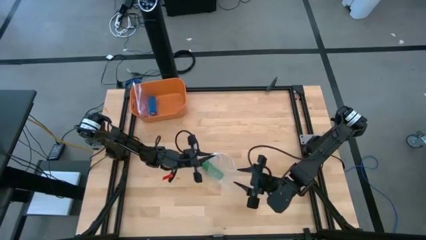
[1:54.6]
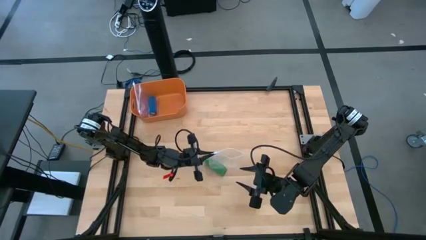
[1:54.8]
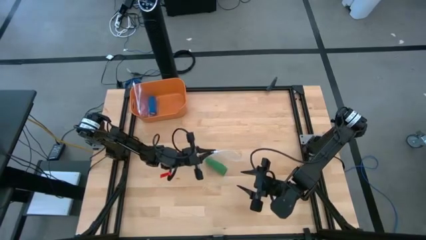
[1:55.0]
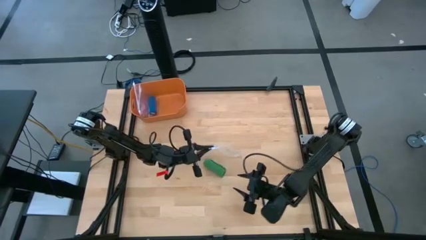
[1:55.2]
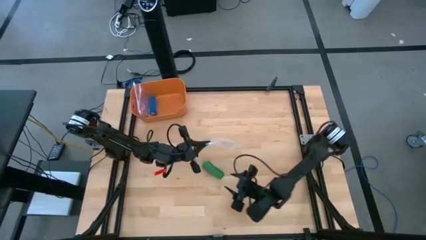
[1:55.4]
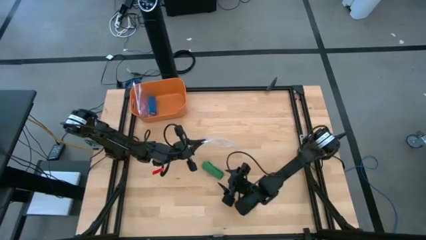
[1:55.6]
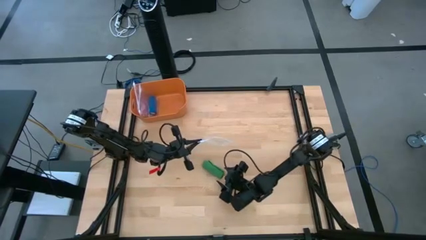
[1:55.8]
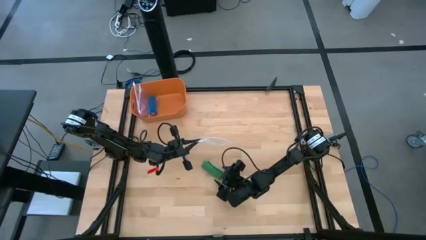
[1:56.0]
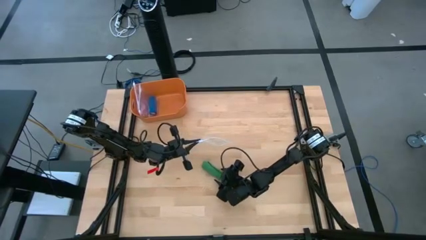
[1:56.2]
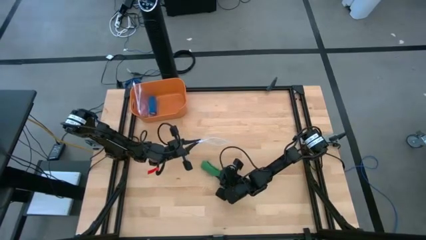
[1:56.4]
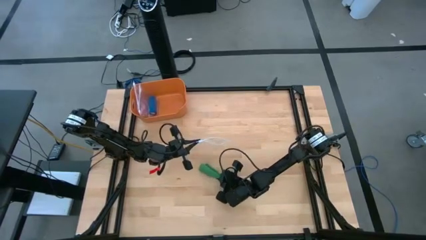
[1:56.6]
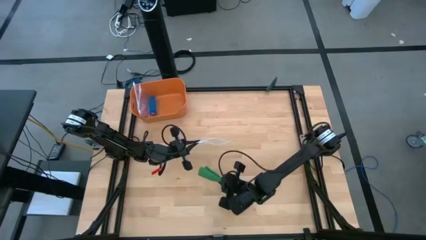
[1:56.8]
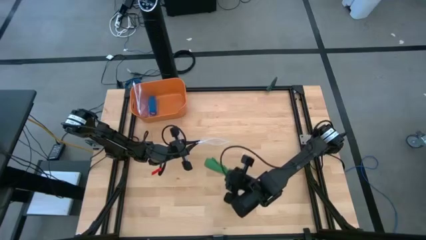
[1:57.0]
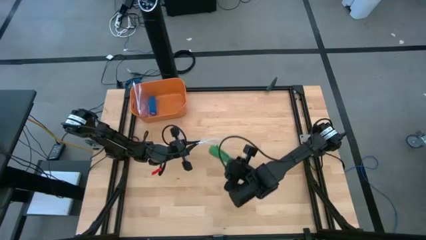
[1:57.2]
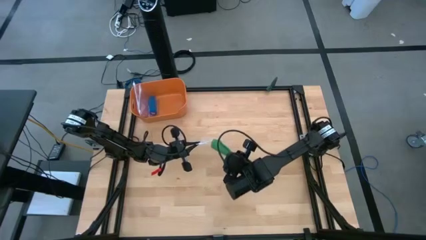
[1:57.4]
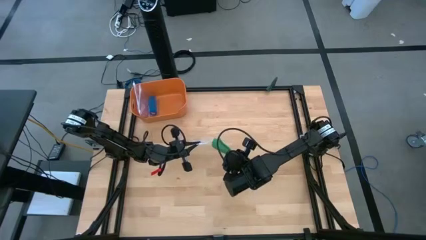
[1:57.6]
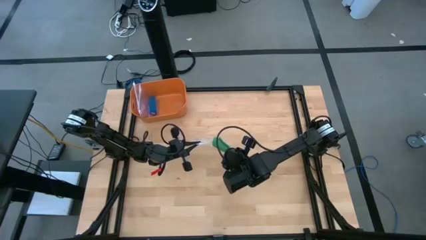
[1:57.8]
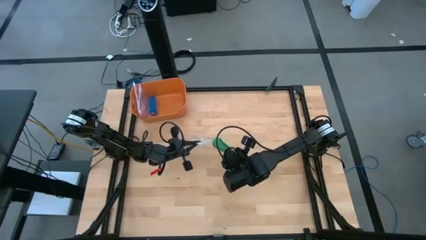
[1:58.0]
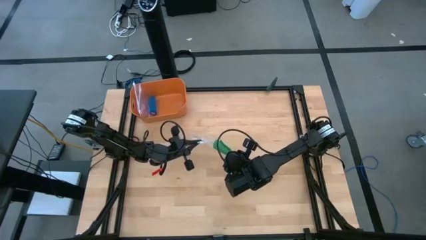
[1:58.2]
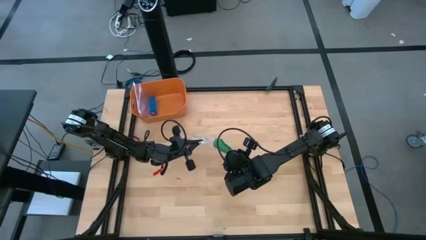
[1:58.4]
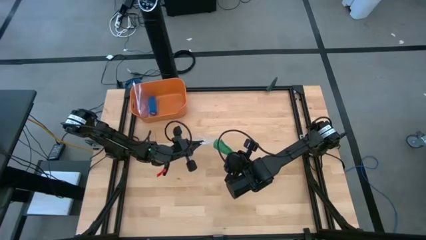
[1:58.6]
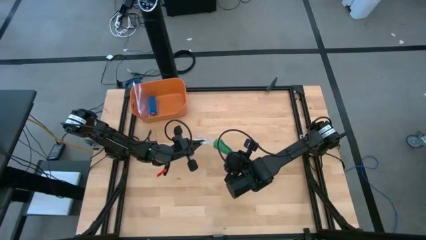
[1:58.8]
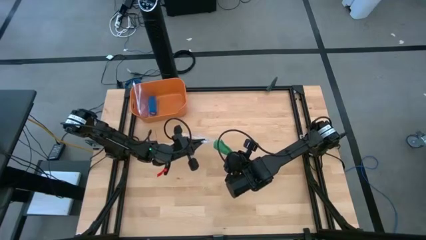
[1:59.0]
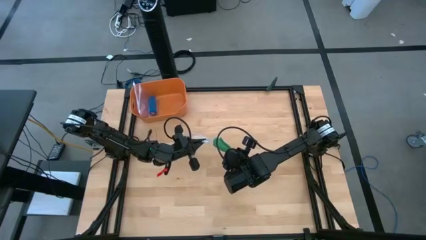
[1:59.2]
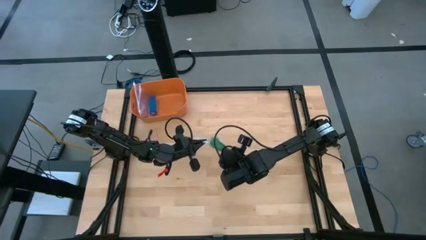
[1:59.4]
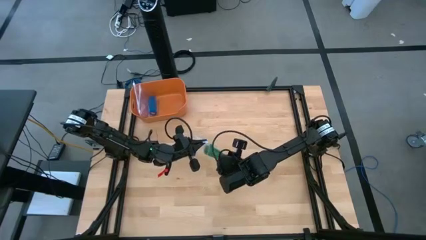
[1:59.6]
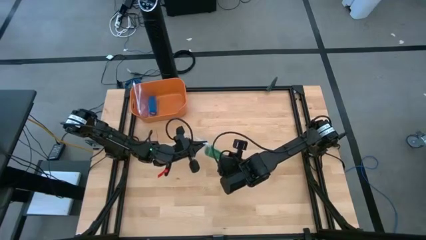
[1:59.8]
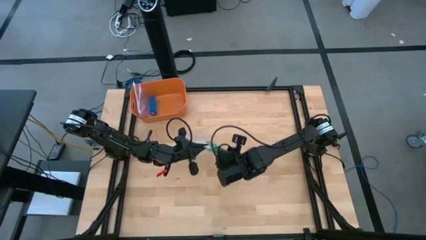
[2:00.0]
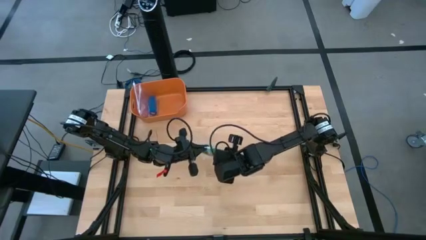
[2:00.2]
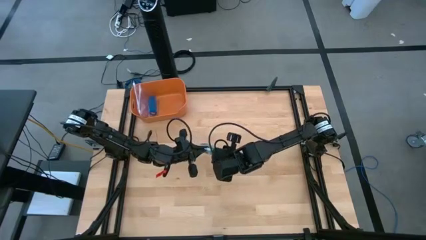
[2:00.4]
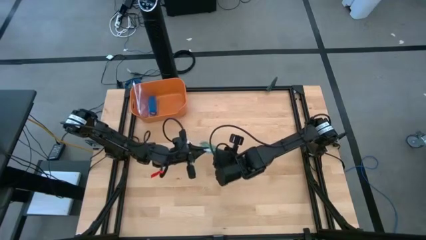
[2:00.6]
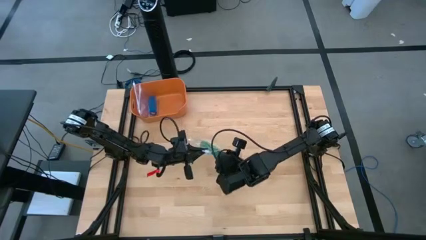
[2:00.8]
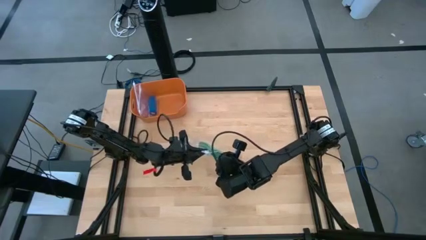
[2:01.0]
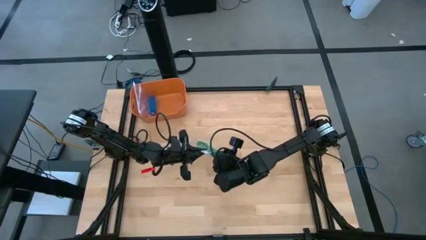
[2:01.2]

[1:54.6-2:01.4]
Task: Roll bandage
Put the green bandage into the transparent zip bag

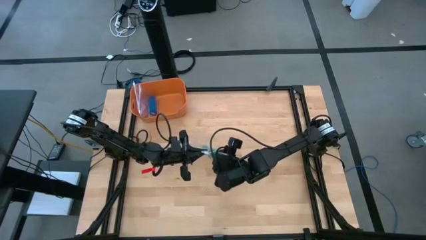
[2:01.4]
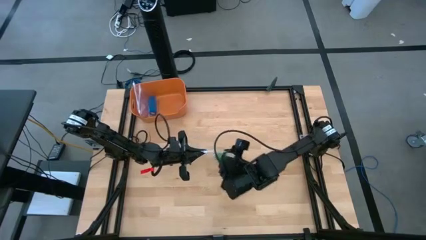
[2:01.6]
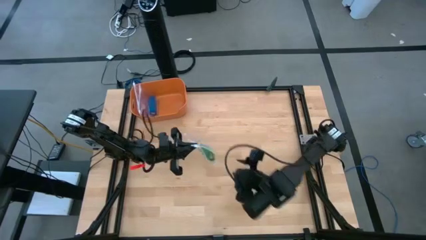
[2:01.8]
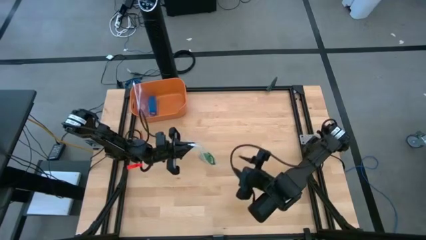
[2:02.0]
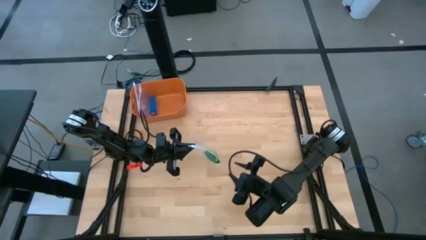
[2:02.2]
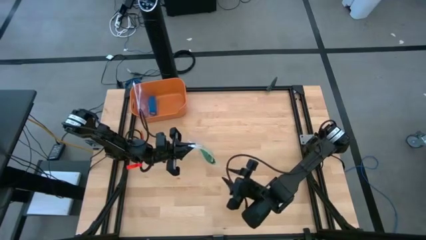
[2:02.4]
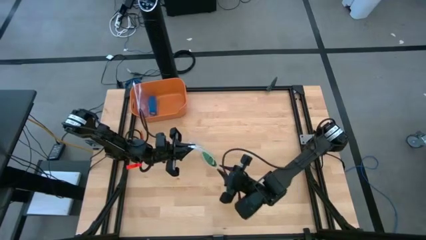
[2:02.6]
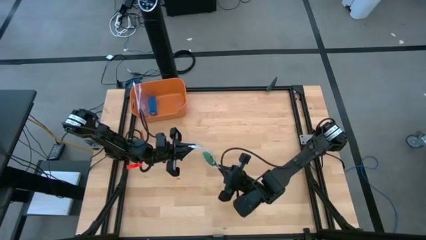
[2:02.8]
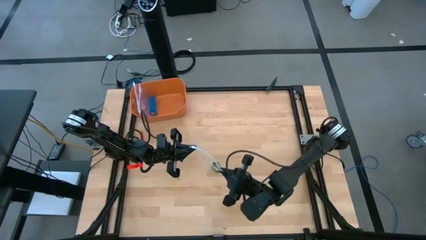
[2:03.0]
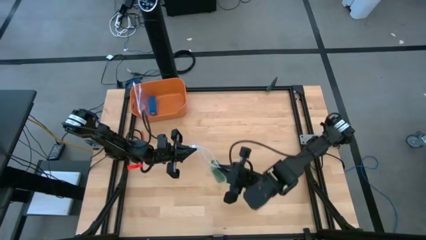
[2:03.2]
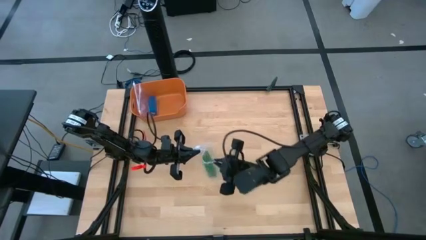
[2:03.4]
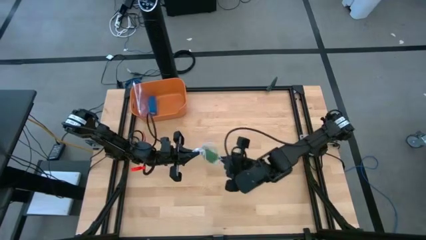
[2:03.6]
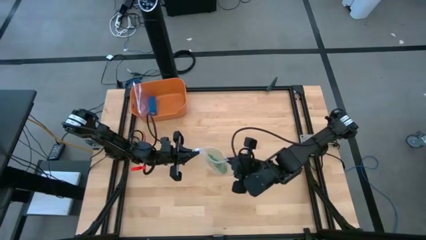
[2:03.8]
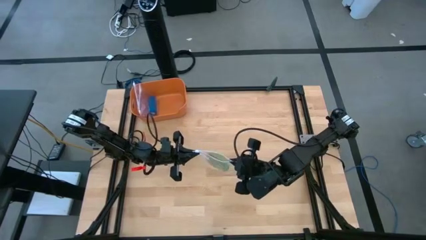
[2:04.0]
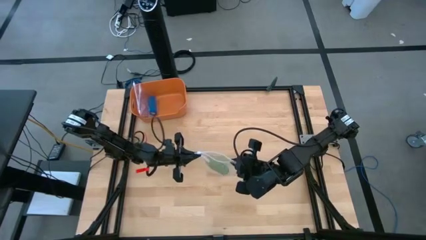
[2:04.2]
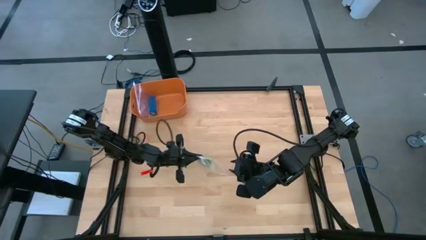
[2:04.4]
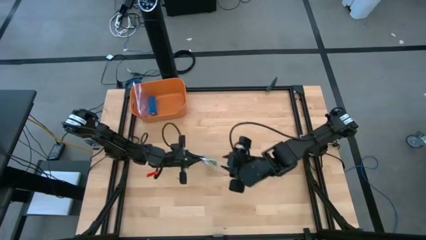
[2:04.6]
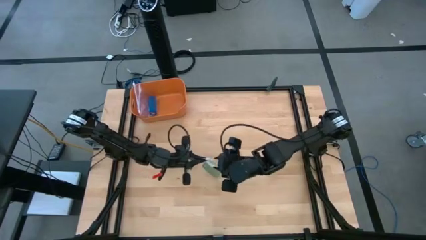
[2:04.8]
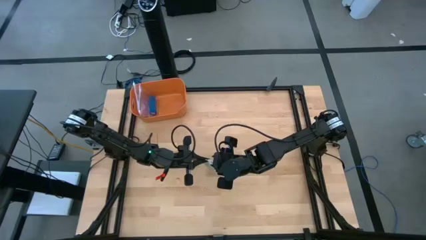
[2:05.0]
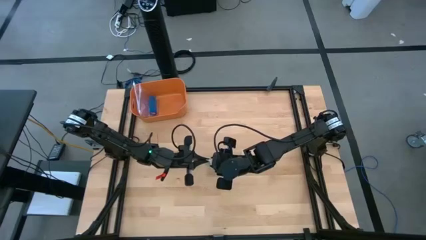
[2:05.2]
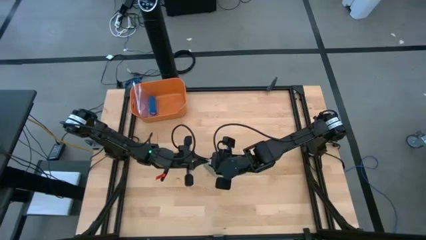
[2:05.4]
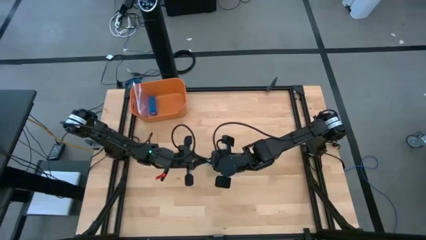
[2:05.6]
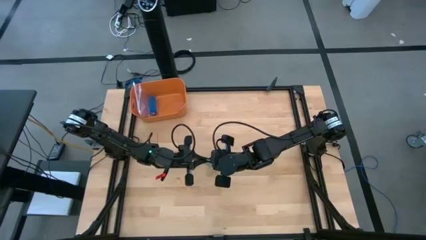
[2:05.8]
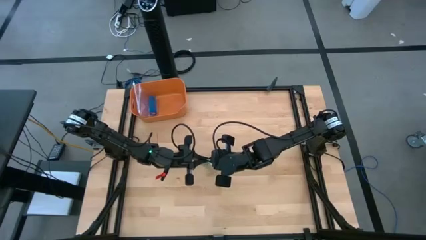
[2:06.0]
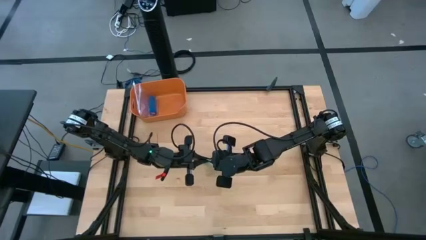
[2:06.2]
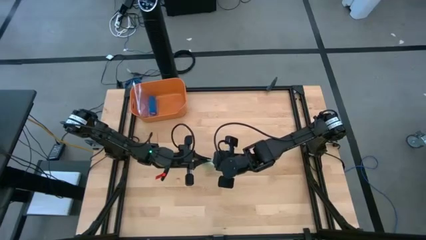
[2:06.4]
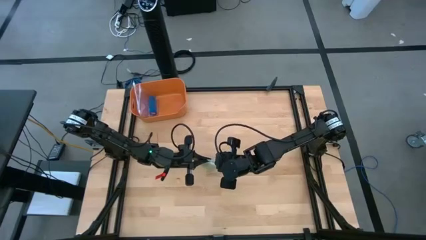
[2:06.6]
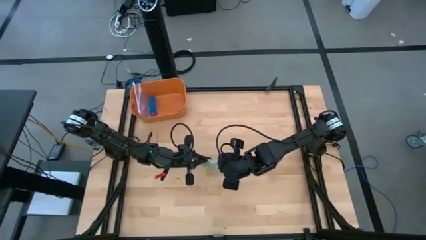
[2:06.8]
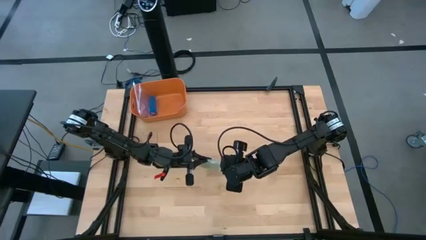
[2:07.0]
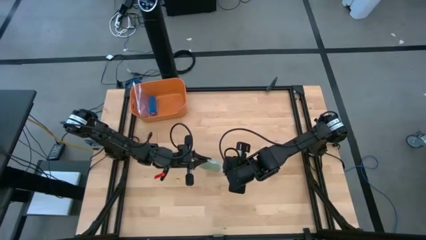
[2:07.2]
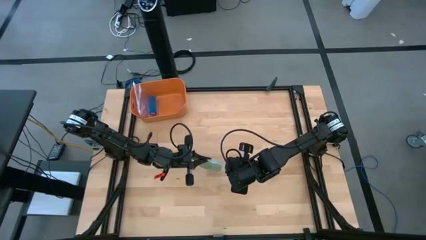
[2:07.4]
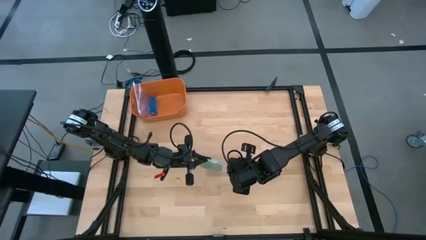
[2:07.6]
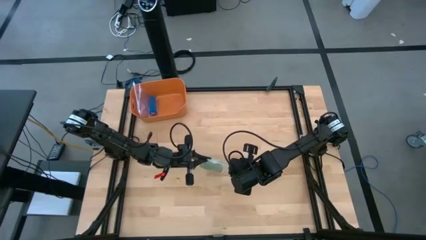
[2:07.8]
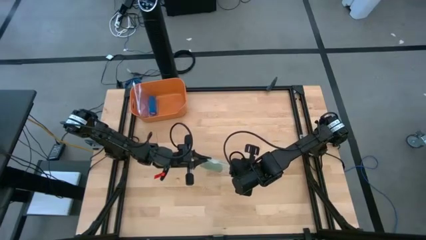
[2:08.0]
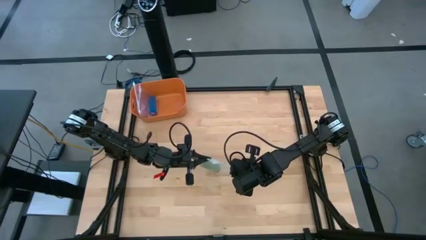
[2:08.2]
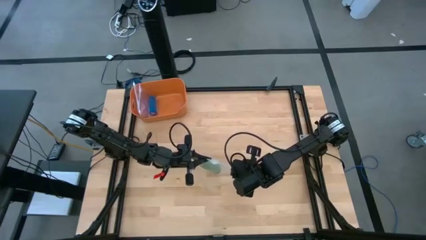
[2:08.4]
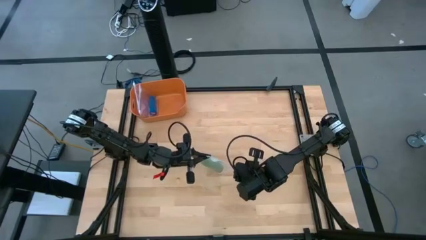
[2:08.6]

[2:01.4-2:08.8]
Close the transparent zip bag

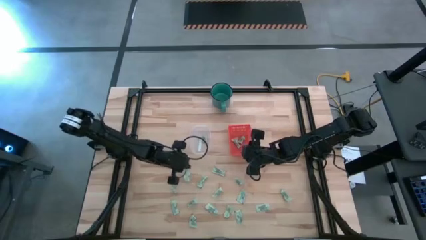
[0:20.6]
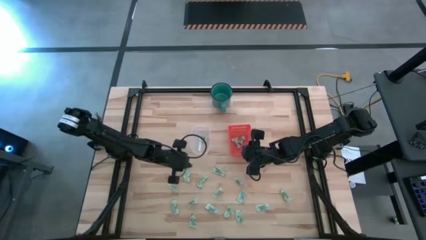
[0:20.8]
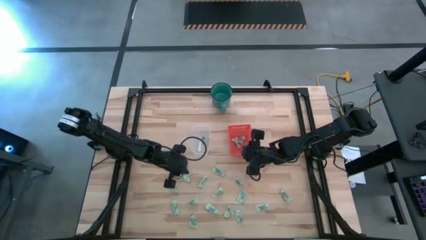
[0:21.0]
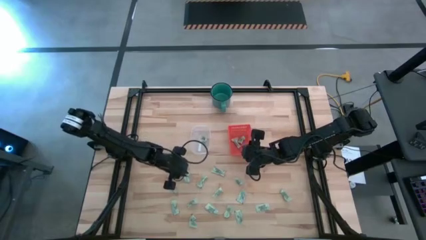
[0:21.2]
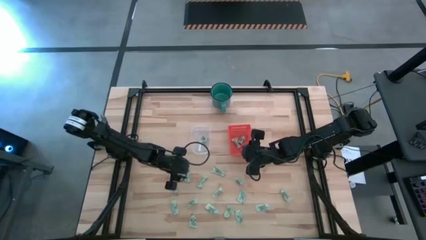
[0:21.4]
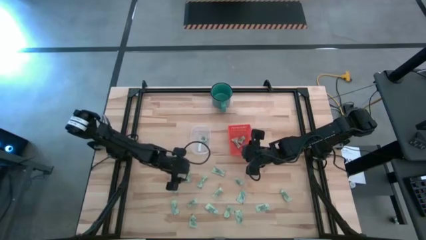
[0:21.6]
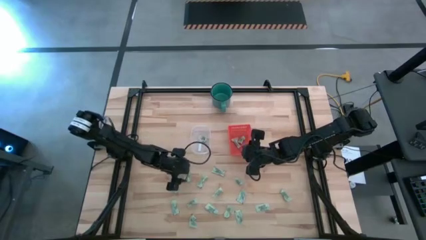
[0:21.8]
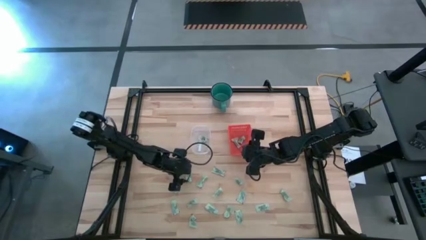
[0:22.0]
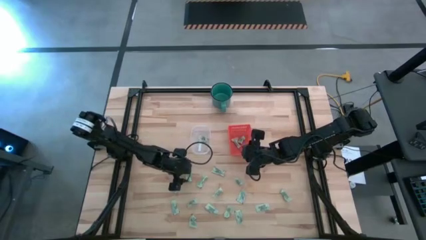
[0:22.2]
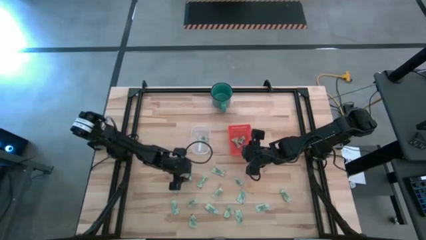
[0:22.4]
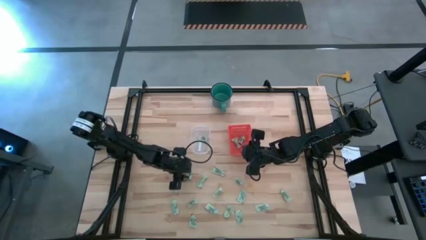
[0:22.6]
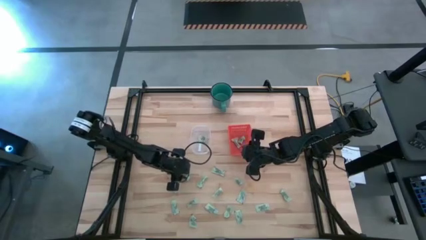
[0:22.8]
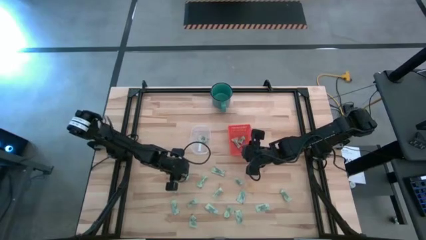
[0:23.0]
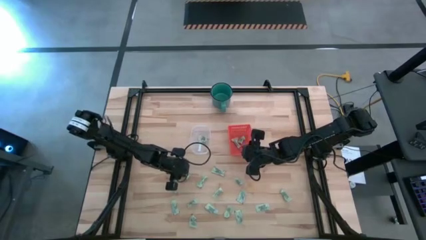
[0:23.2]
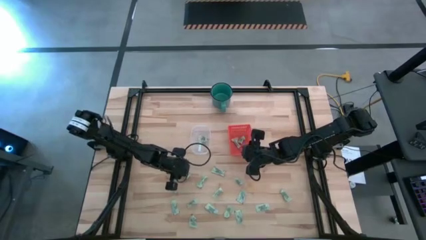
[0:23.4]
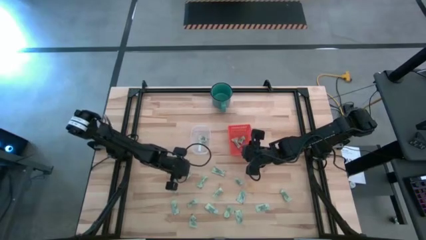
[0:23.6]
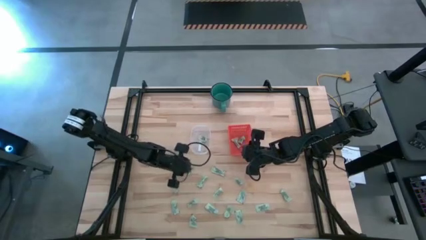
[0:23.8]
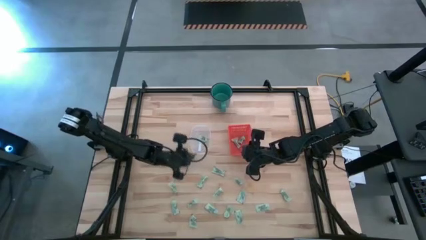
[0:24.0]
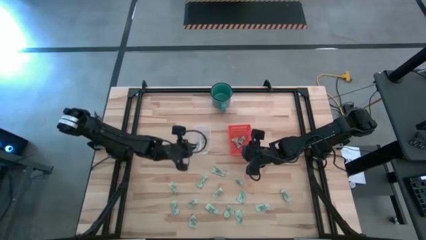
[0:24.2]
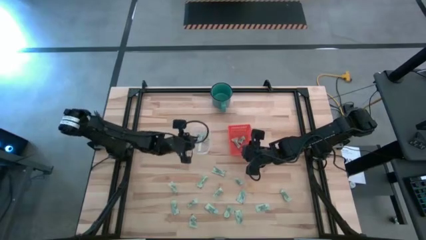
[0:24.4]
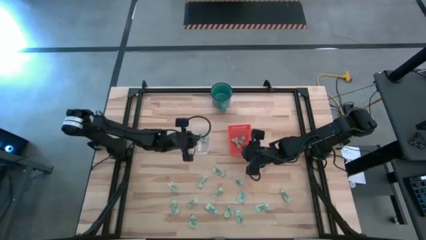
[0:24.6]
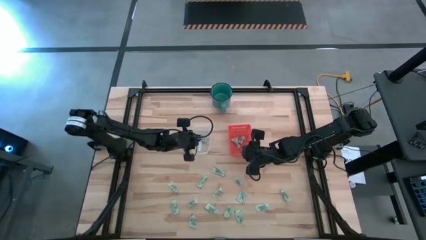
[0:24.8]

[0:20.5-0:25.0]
Task: Pick and place items into bin
Put the stevia packet into the transparent bin
